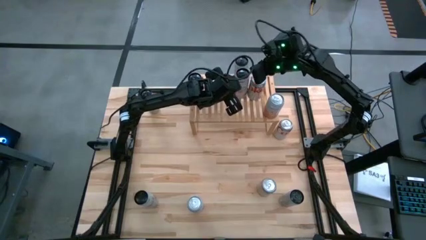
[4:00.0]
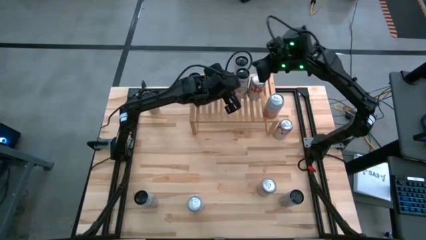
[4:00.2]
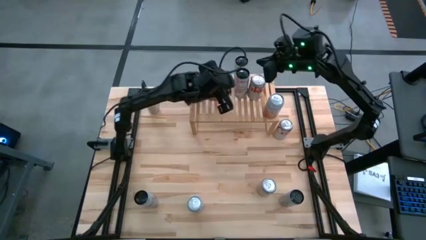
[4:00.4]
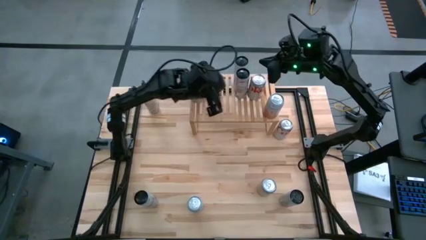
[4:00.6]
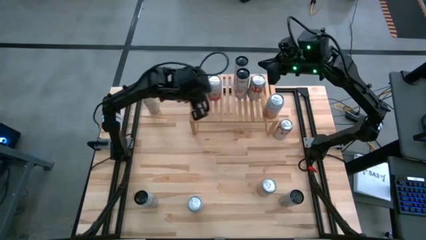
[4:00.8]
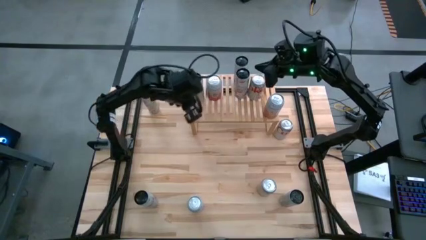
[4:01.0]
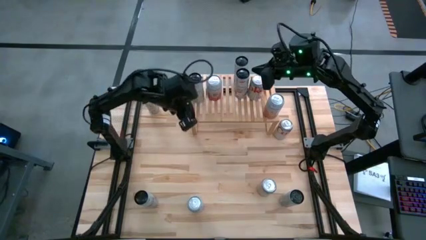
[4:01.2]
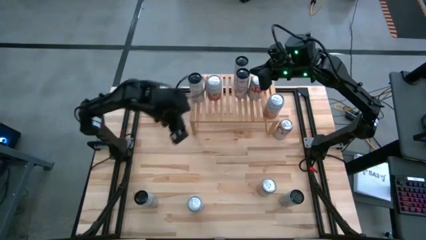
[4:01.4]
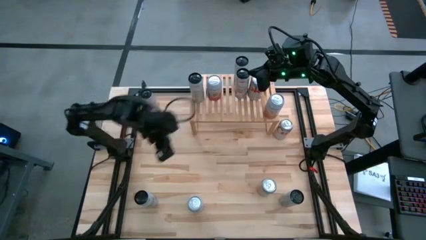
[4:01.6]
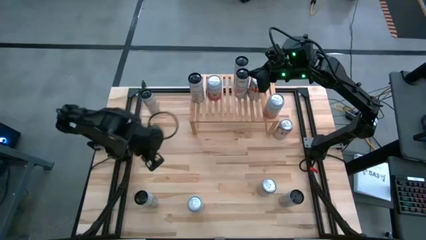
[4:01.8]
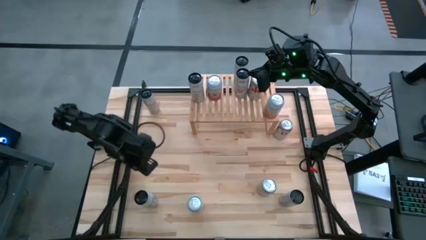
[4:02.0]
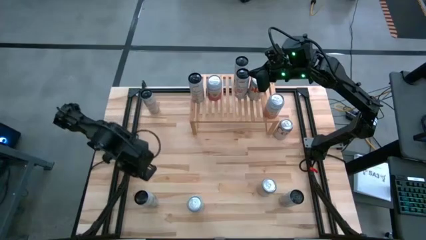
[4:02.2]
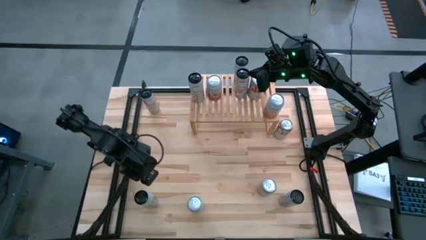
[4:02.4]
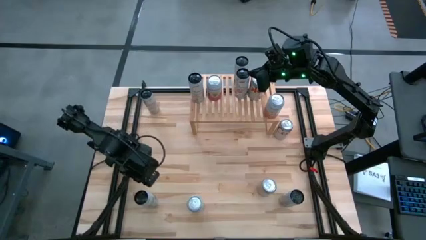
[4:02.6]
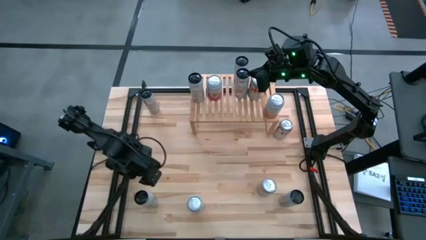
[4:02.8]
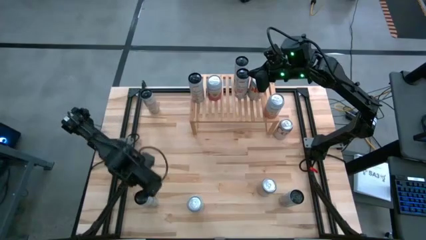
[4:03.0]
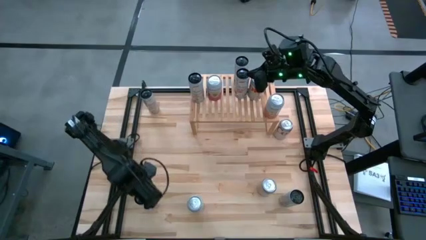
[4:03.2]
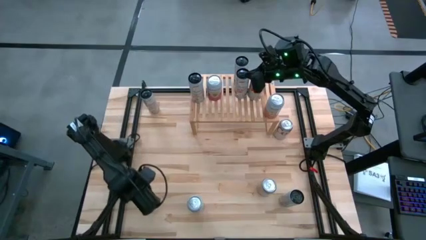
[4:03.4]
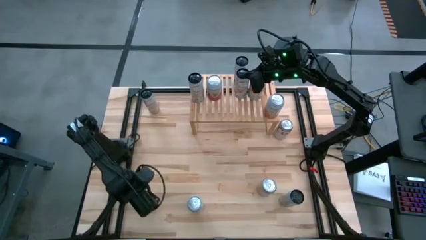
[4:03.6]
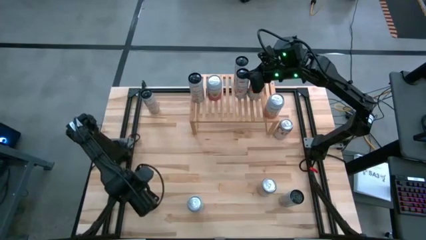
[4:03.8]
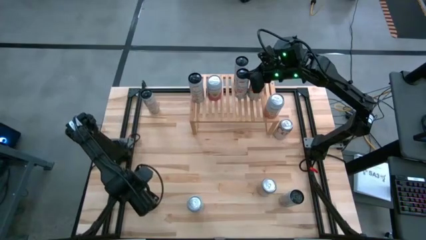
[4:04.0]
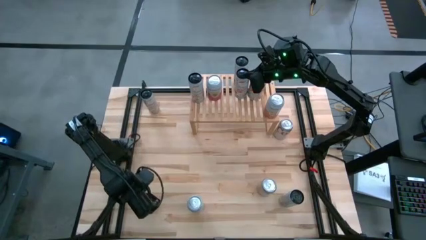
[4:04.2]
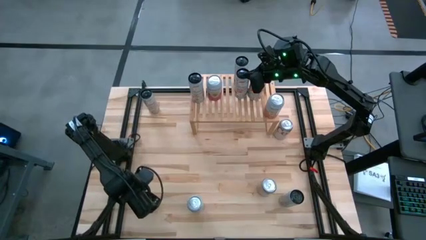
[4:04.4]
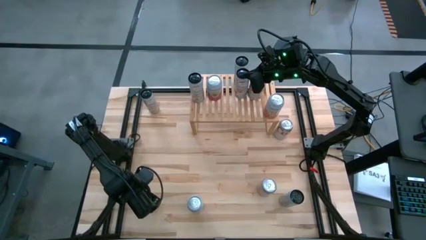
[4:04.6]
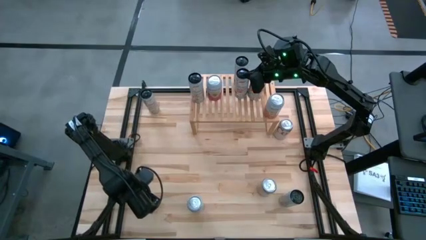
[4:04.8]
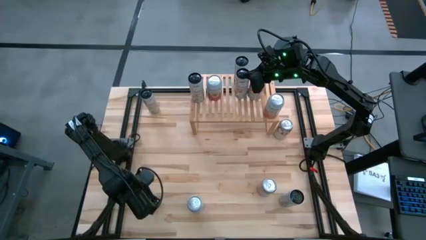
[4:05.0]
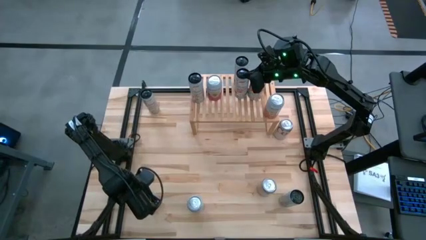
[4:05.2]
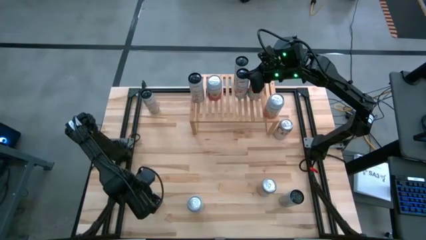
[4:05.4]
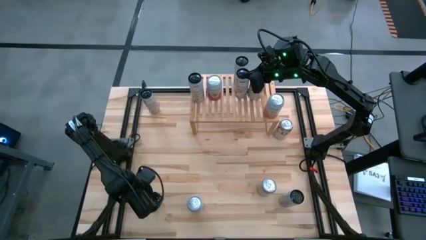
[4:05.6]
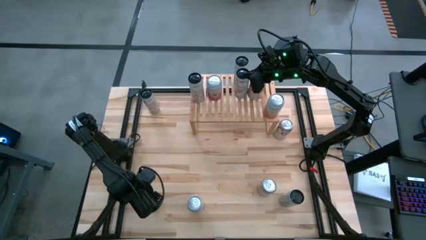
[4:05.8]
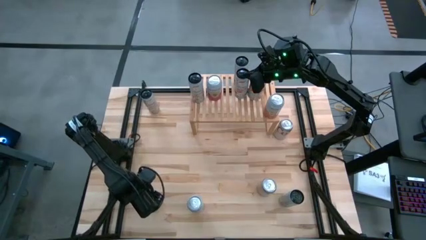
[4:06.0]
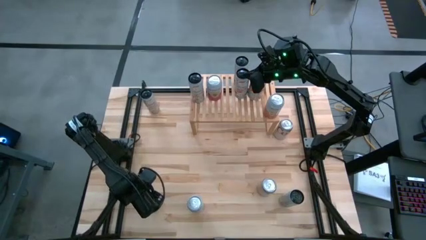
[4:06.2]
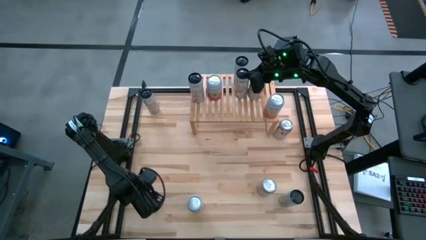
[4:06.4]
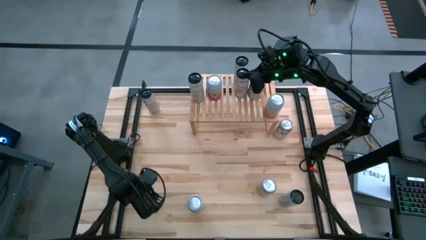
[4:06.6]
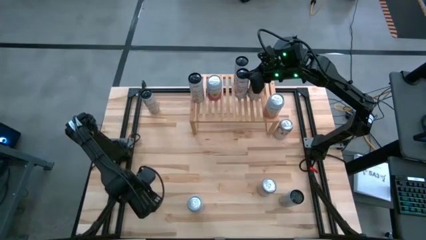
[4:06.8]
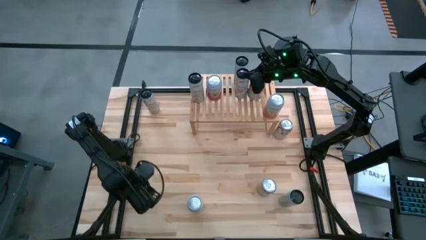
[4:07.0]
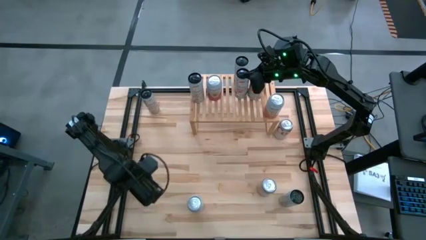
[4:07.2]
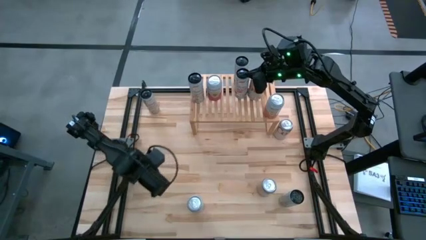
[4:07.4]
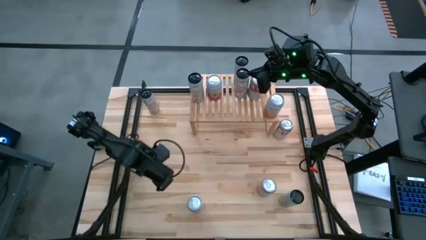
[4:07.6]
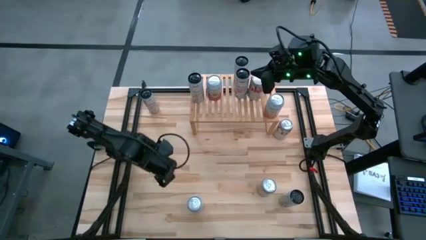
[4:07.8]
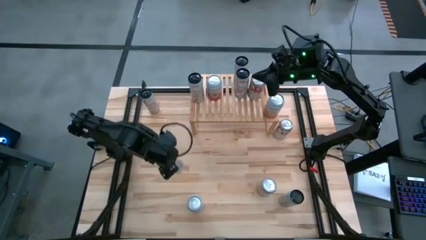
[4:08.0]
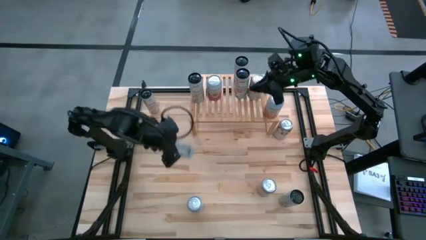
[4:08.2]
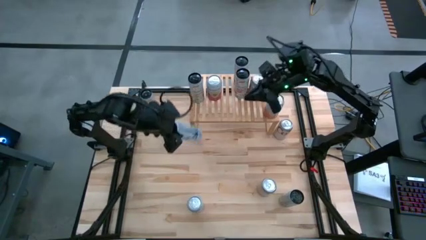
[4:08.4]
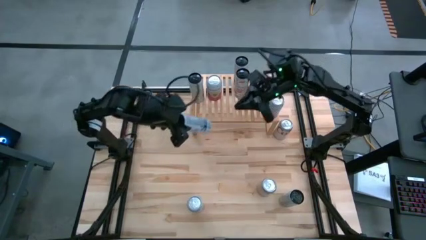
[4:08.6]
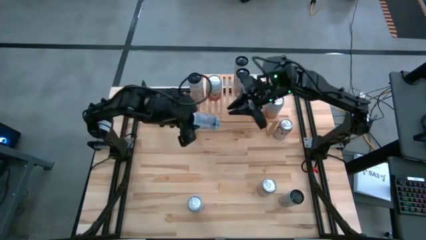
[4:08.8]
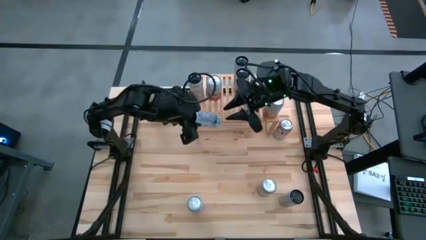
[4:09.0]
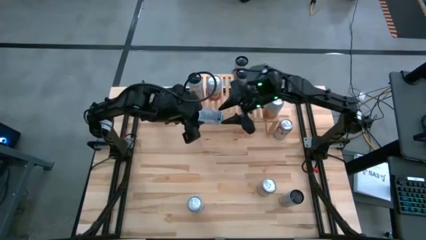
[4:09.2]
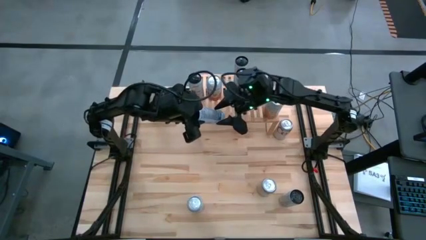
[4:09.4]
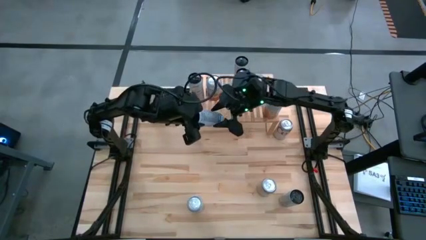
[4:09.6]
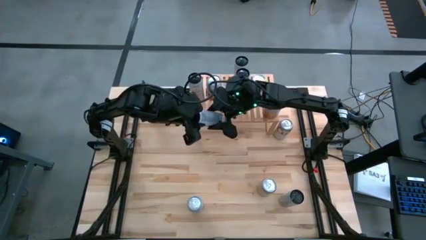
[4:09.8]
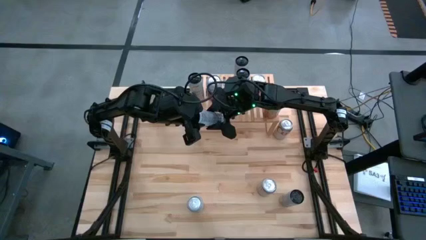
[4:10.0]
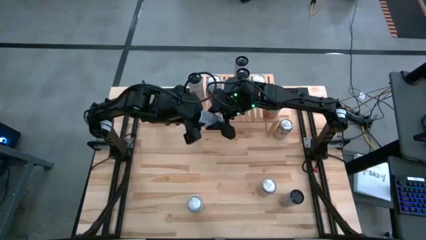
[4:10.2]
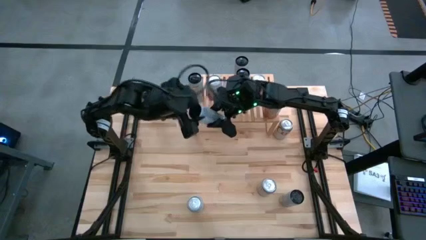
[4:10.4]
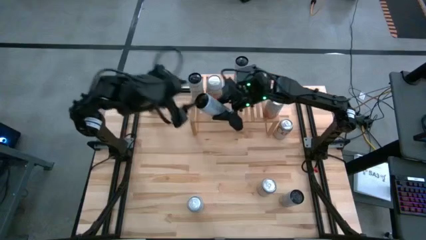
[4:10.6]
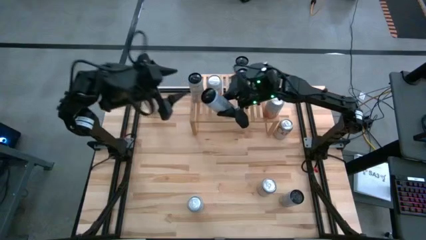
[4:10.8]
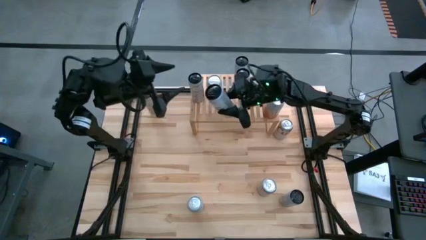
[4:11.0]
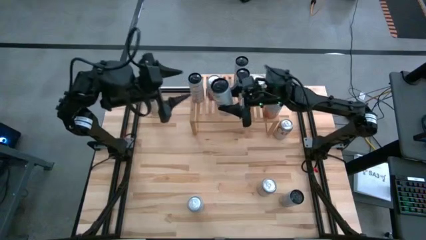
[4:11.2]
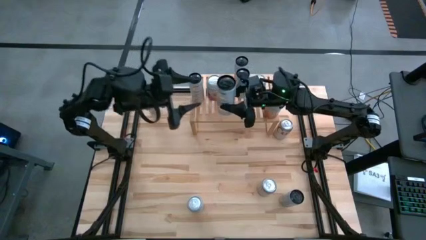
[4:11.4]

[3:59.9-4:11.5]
Task: Place canned beverage on shelf
Put the blue soda can on the shelf

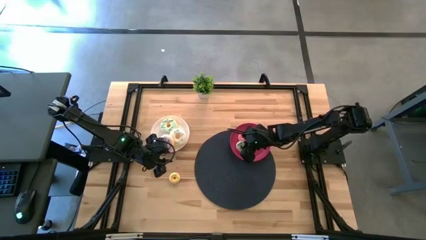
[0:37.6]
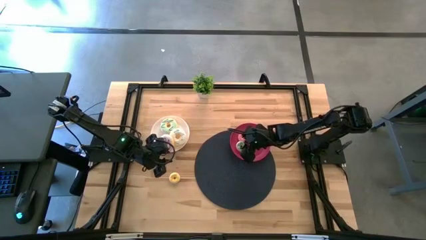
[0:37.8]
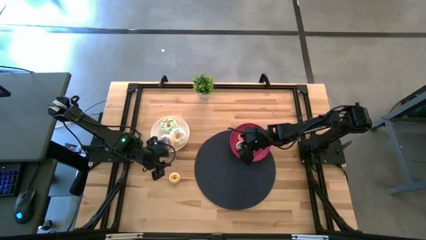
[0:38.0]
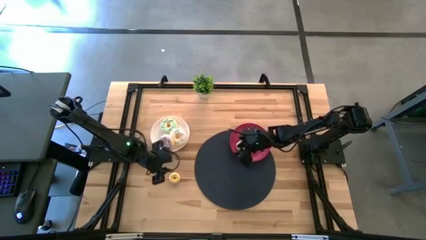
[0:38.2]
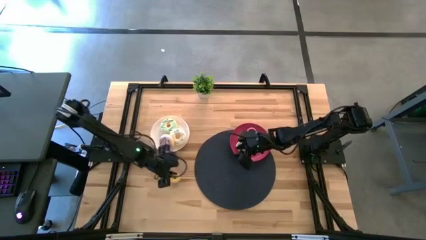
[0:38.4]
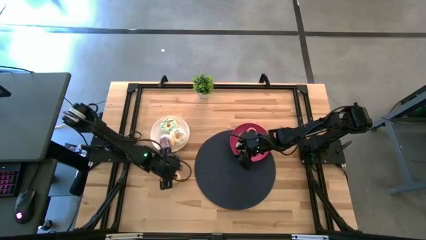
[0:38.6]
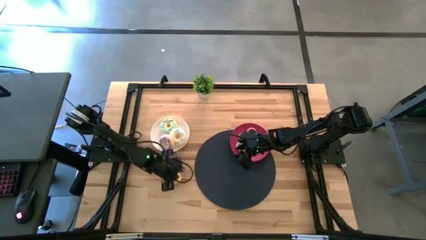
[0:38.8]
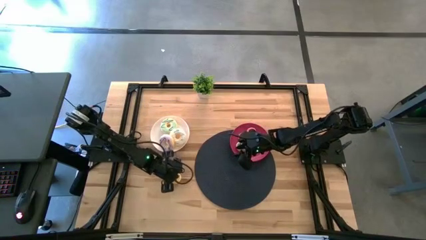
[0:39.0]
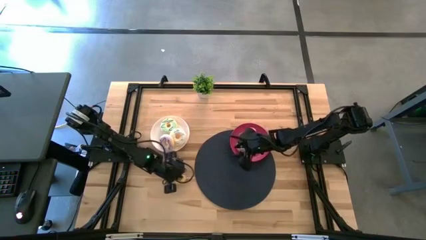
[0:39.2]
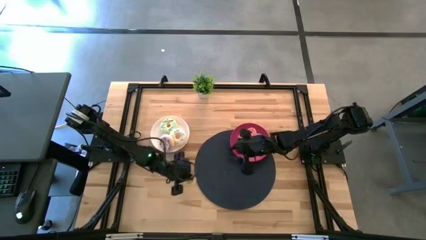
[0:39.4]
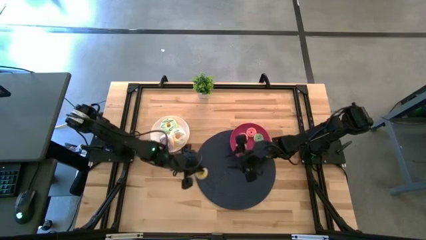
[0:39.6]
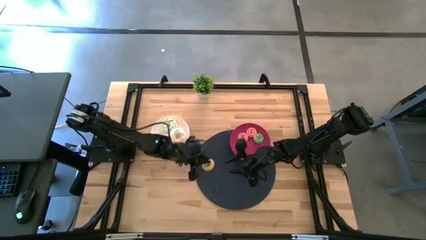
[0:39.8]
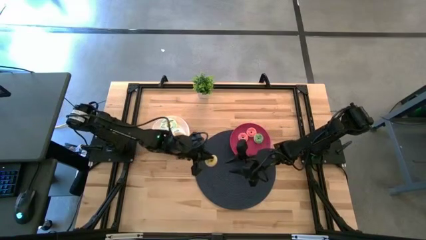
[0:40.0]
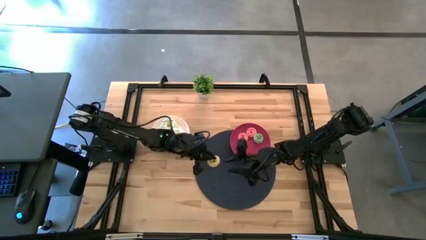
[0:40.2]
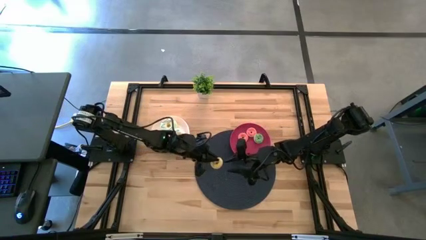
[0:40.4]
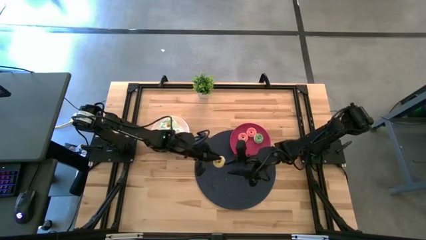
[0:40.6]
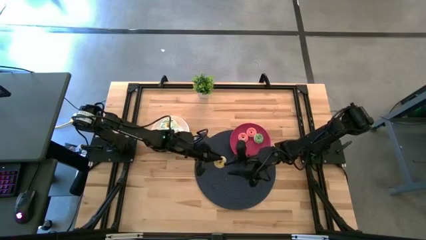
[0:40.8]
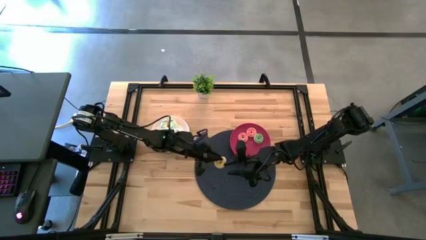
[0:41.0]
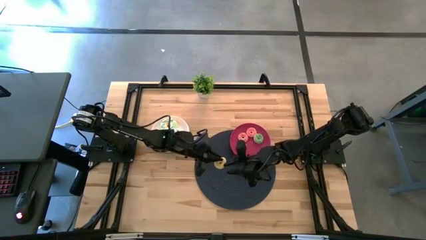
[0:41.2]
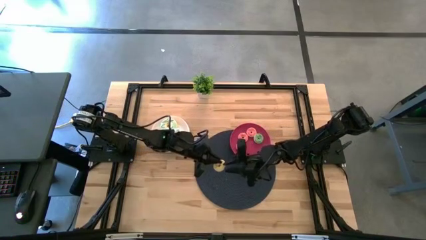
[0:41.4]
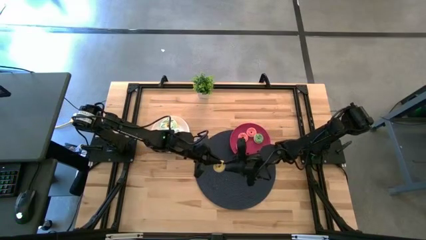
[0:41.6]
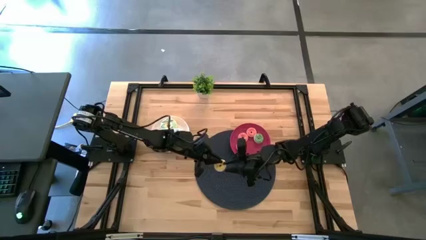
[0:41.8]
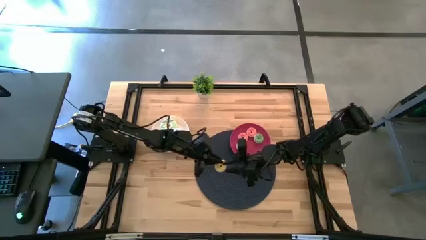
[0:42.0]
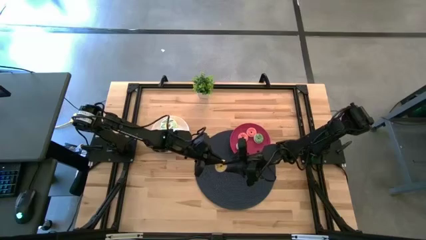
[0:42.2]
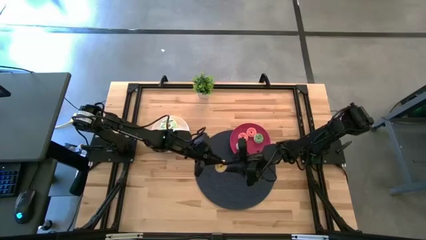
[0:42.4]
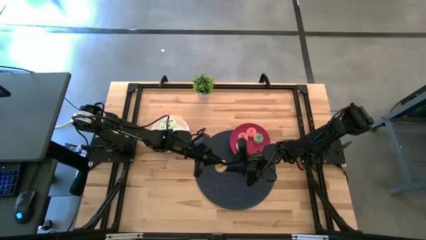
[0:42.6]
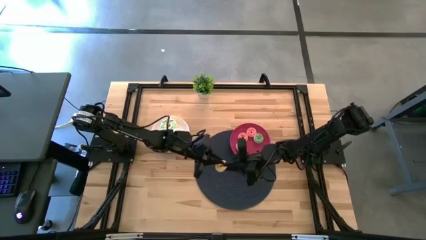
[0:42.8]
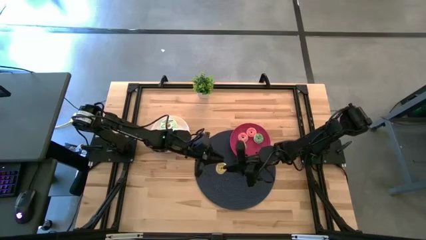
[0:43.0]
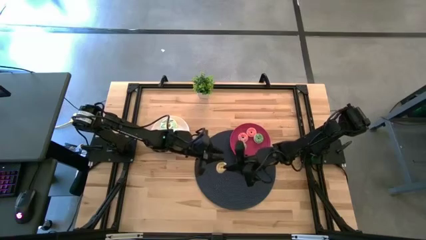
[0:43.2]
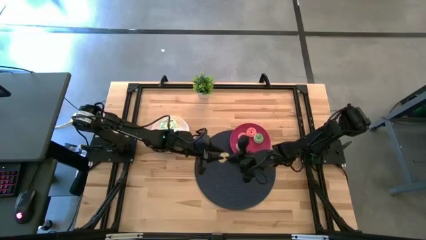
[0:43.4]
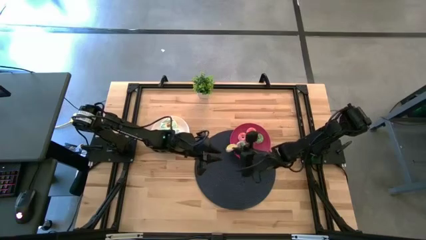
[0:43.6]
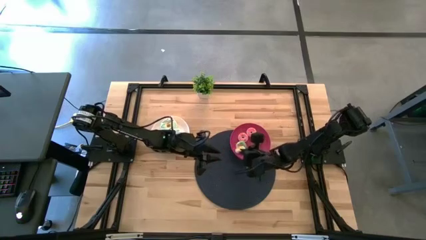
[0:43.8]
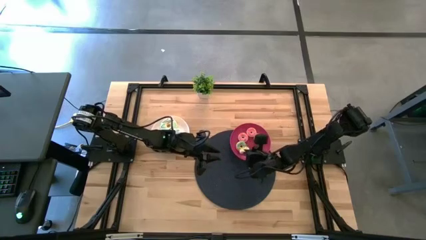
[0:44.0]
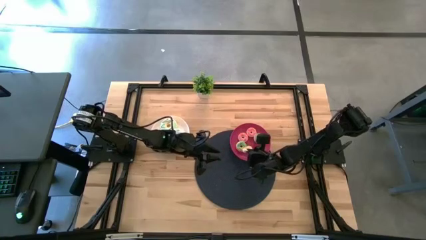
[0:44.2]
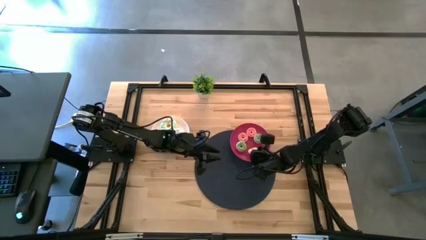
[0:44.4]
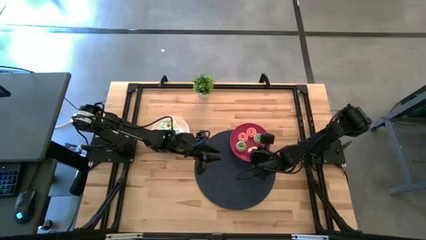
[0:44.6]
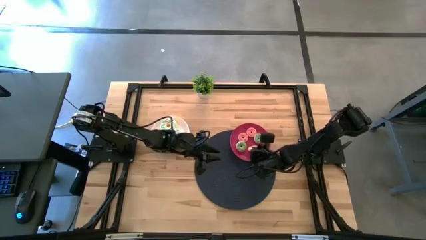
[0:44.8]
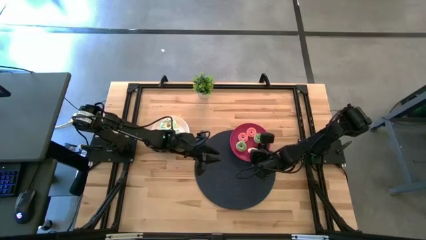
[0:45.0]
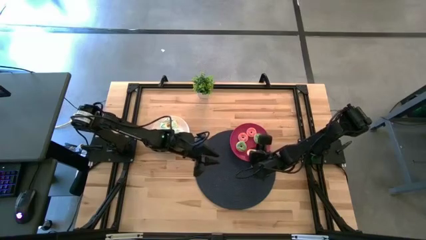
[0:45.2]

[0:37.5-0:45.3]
Task: Pick & Place donuts
Put the small yellow donut onto the red plate
